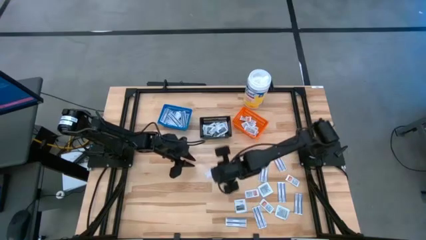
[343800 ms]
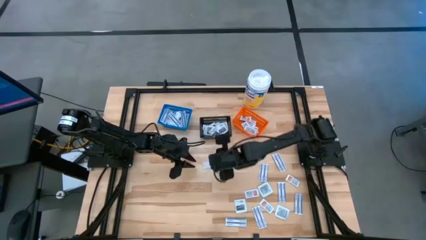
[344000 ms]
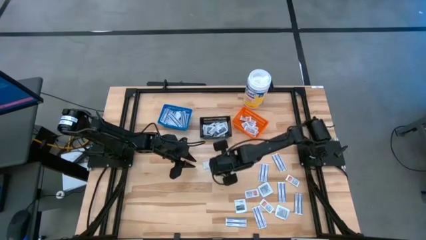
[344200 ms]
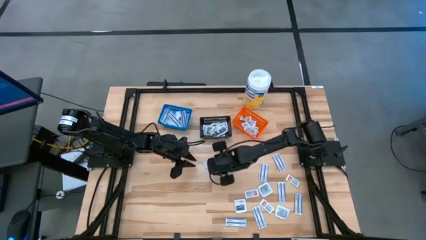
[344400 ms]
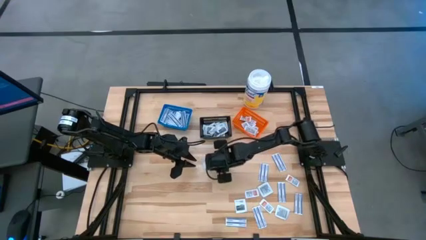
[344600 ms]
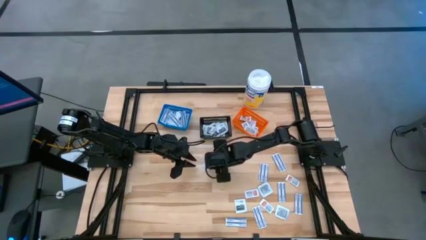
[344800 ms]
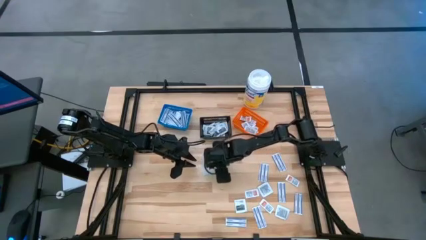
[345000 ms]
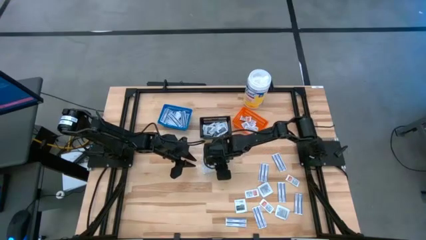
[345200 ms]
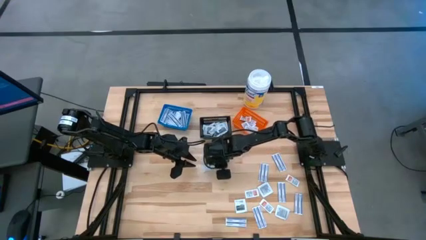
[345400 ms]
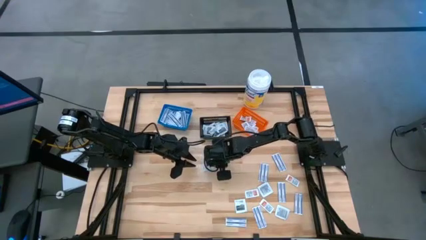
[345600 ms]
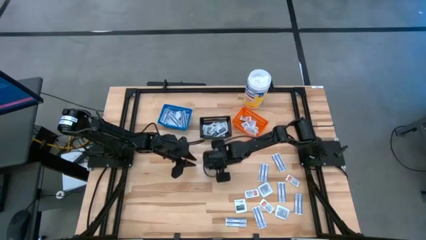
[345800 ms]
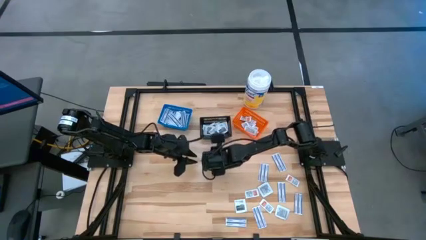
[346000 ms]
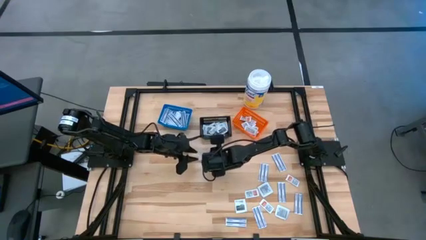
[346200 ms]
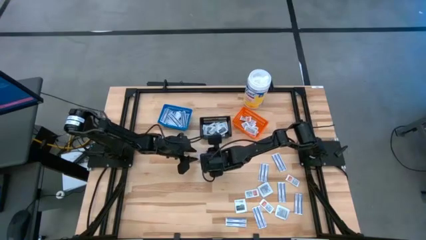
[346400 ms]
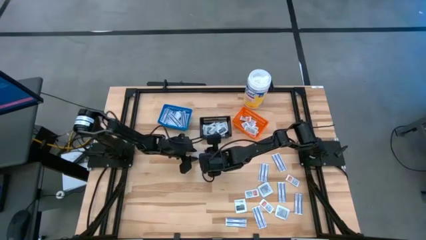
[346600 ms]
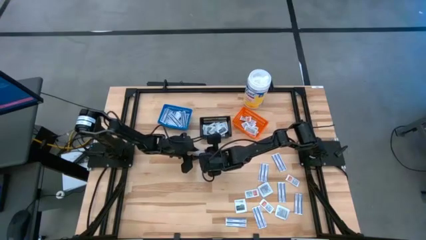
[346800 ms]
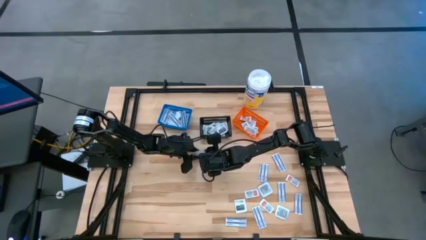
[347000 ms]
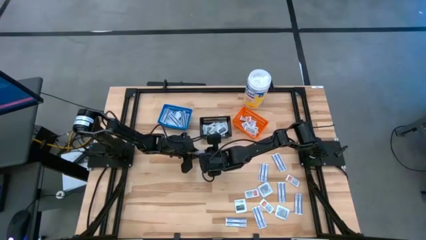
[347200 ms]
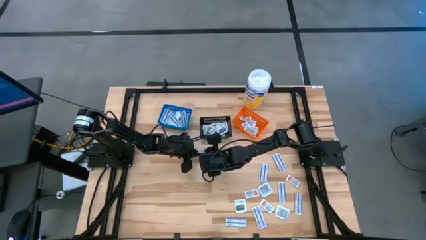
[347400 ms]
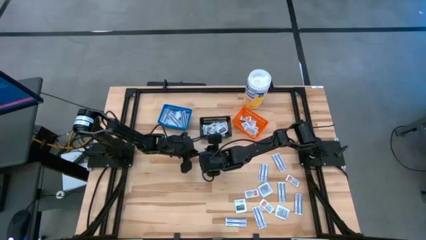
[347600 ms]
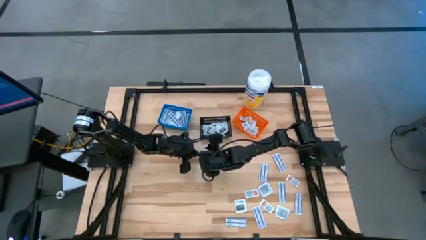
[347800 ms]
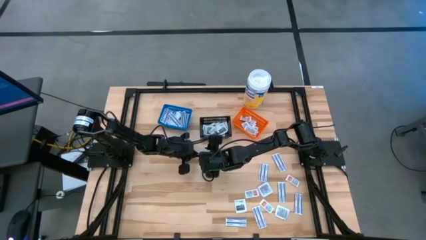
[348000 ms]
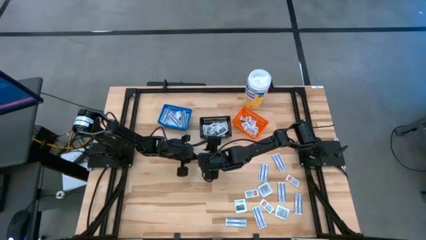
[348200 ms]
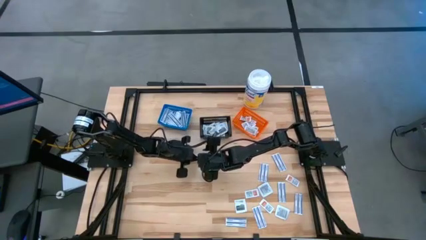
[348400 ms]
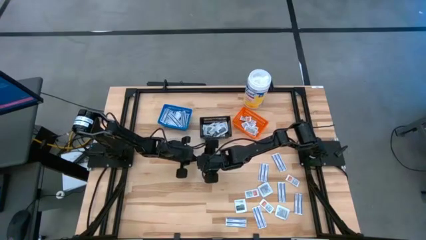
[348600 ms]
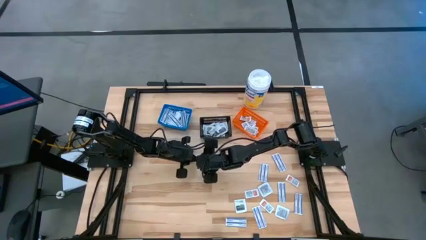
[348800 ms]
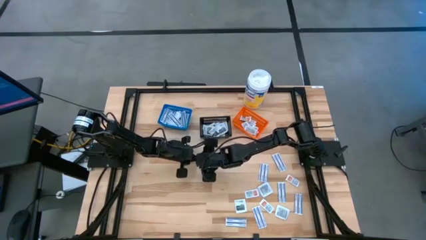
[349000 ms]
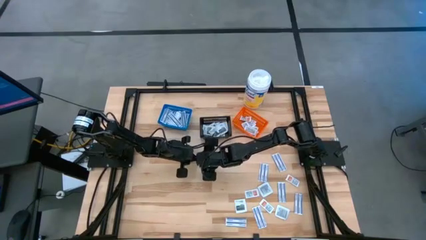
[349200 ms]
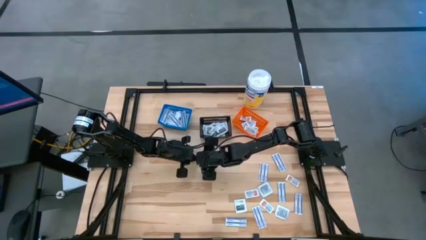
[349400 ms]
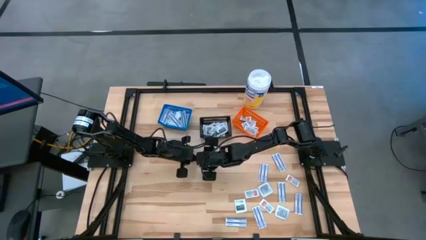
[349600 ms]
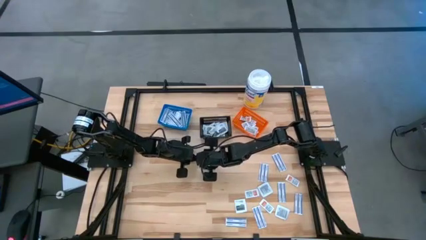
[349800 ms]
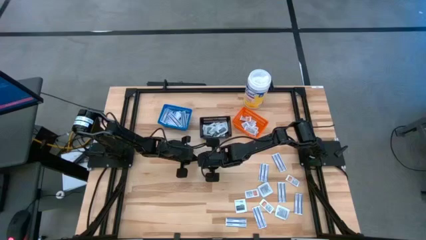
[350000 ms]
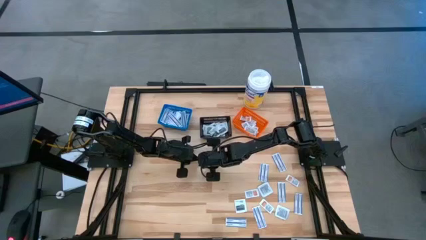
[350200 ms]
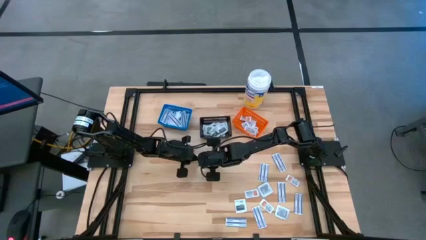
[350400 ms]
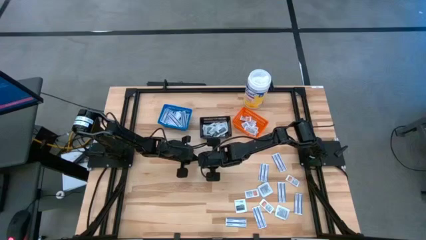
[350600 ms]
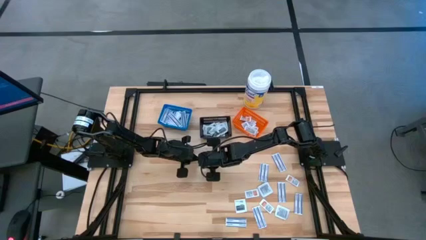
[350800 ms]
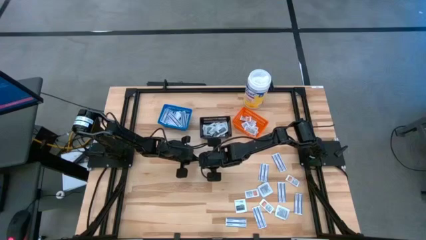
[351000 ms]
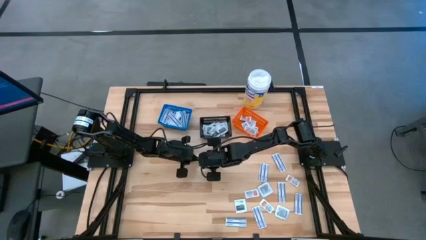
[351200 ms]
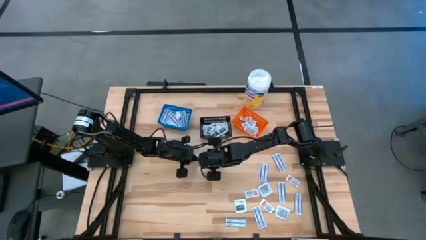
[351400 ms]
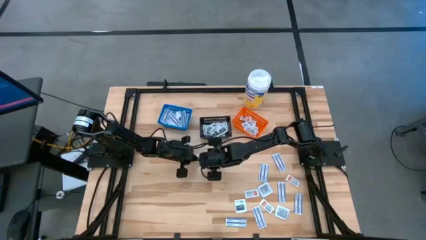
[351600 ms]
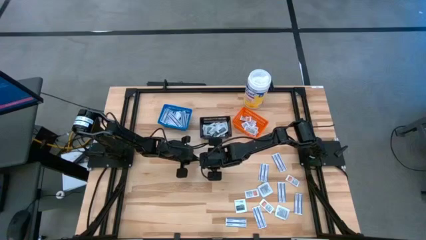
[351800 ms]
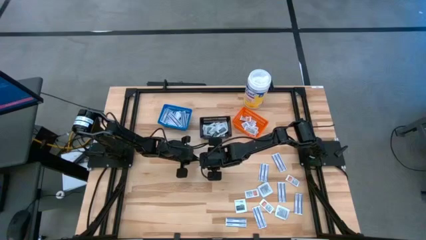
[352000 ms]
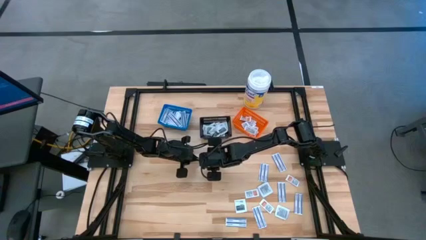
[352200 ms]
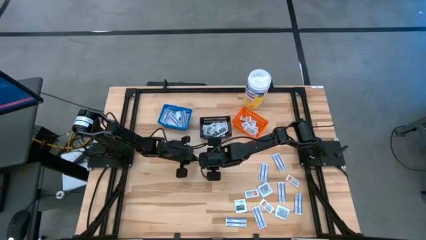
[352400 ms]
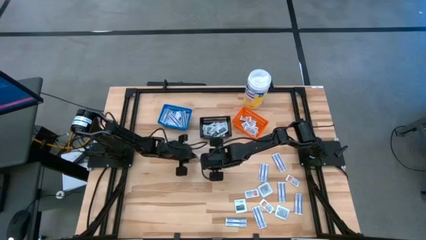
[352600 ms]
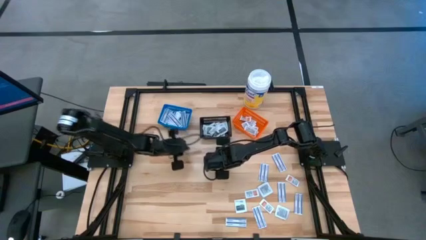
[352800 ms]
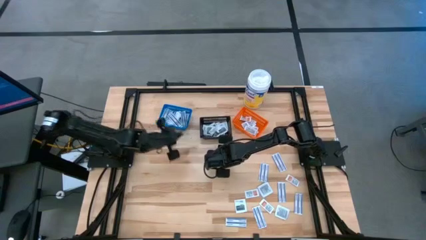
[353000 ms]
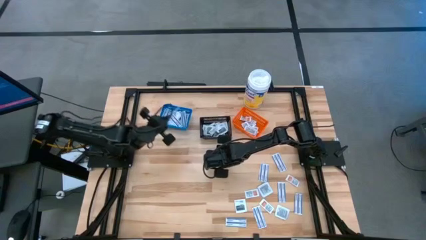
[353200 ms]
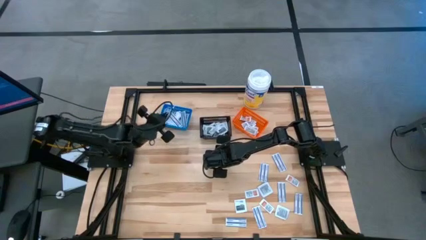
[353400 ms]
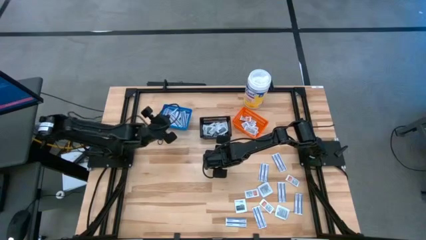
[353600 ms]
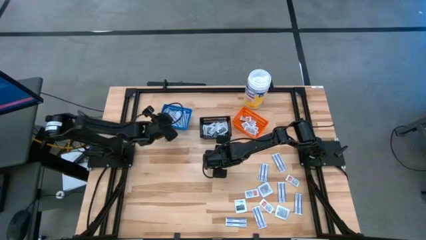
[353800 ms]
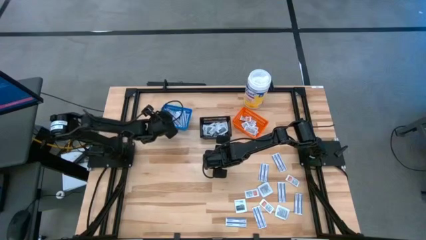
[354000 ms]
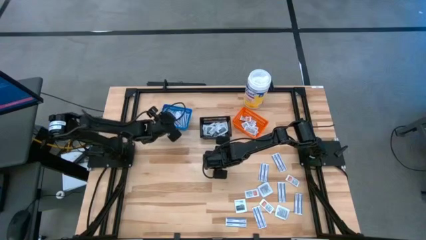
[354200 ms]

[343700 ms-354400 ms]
Task: Pick & Place First Aid Supplies
Put the bandage into the blue container

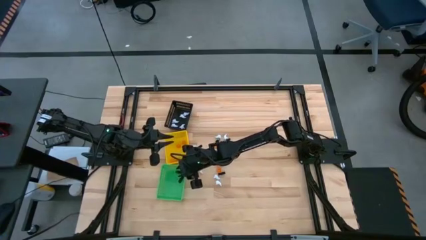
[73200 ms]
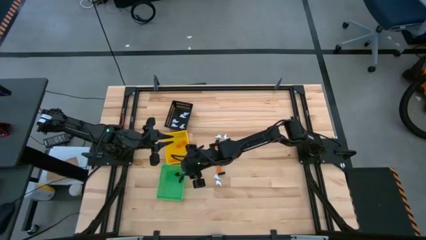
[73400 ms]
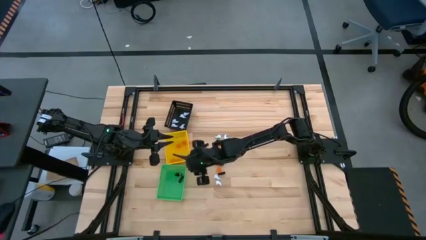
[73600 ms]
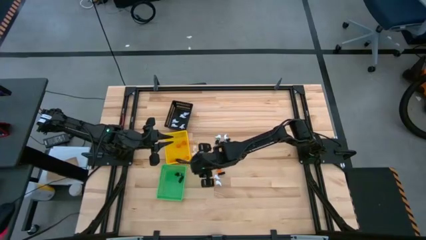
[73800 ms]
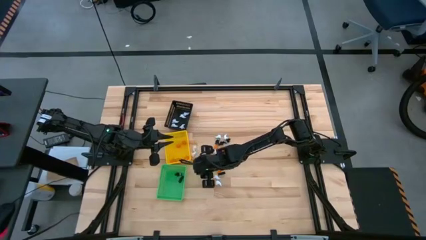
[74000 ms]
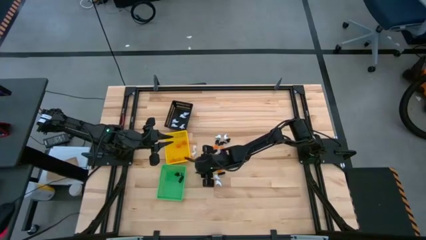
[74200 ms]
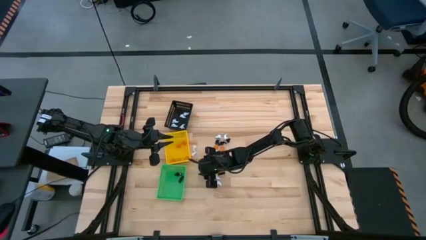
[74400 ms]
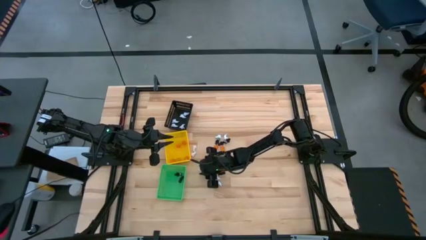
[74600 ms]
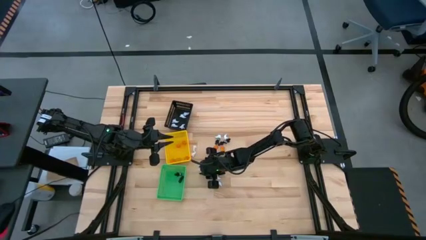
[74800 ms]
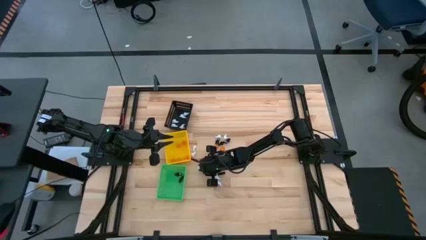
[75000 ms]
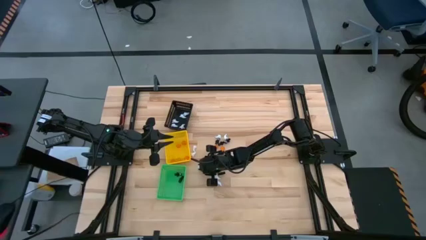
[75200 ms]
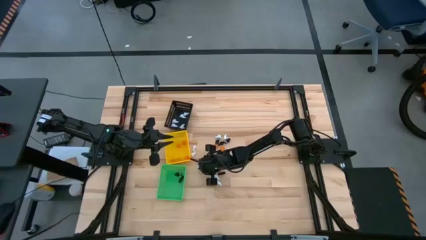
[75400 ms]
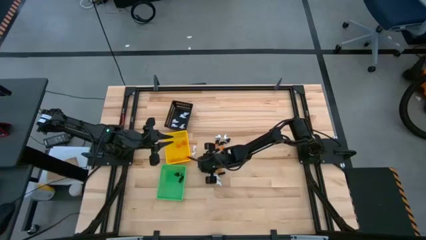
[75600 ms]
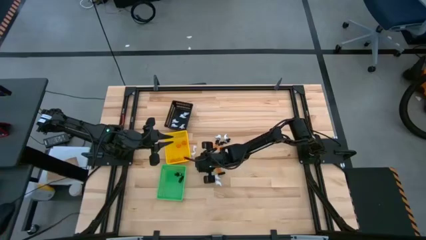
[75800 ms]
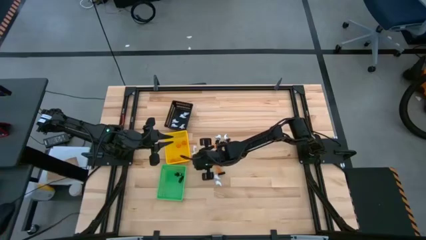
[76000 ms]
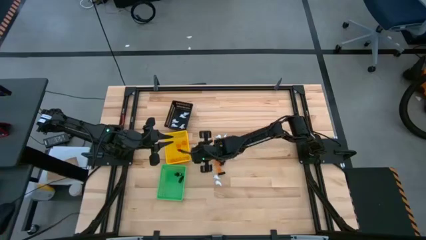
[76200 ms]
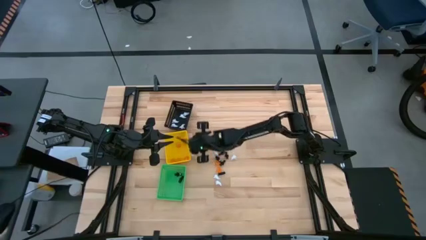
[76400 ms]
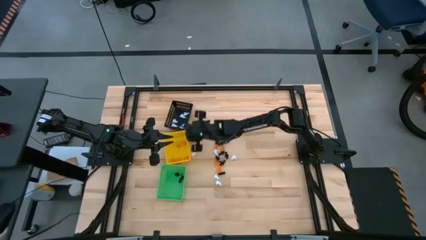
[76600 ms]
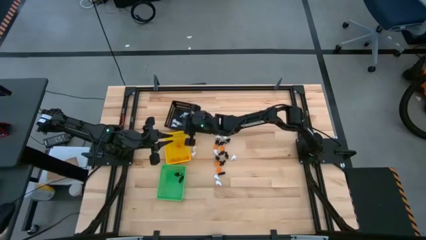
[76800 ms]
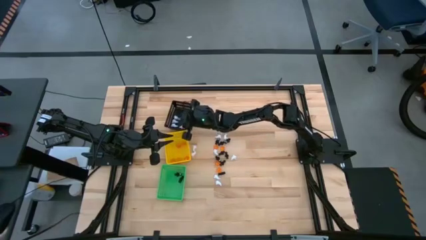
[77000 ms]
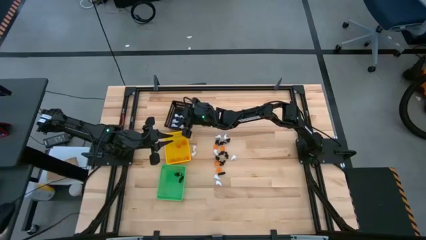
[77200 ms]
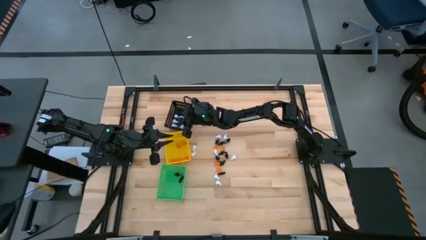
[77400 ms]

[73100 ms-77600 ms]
Task: Sort Halloween decoration
Put the white ghost plush toy into the black basket

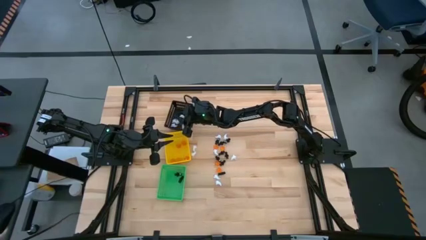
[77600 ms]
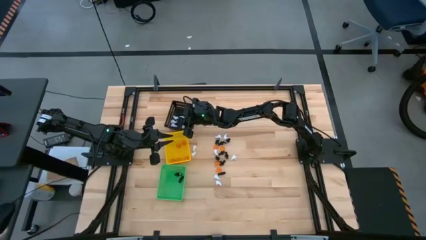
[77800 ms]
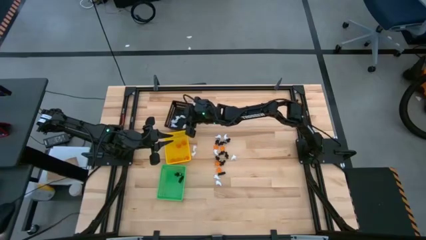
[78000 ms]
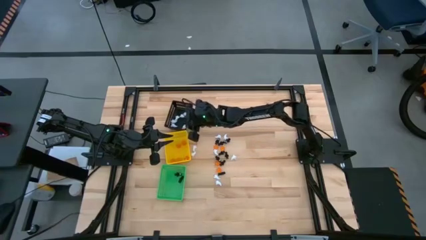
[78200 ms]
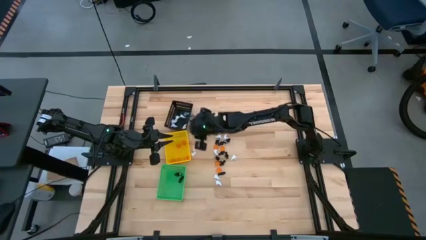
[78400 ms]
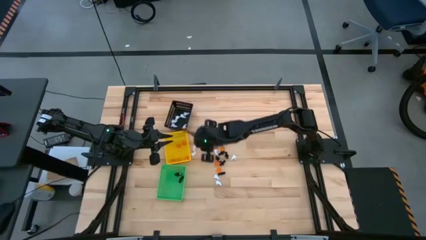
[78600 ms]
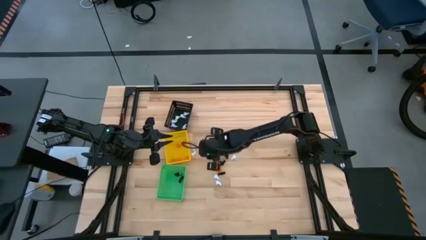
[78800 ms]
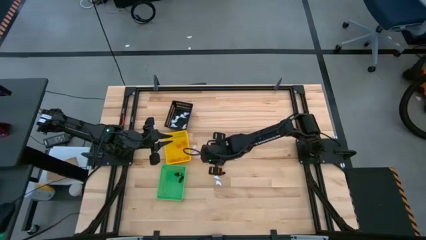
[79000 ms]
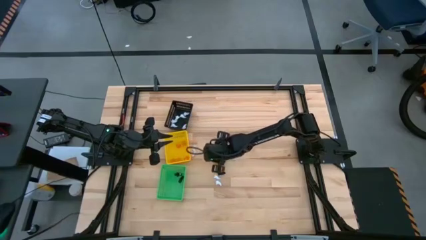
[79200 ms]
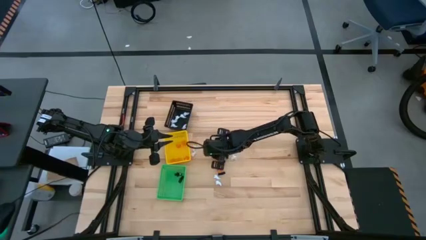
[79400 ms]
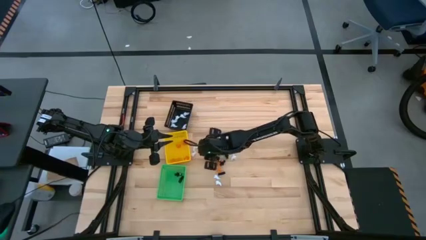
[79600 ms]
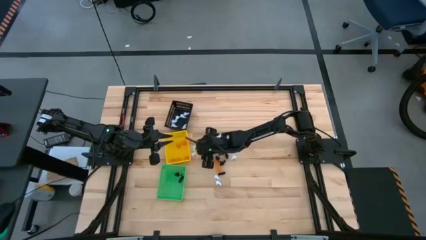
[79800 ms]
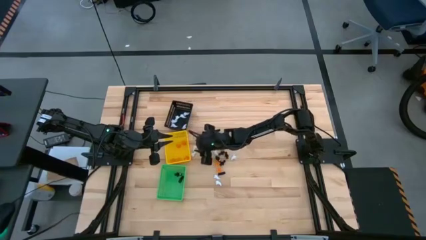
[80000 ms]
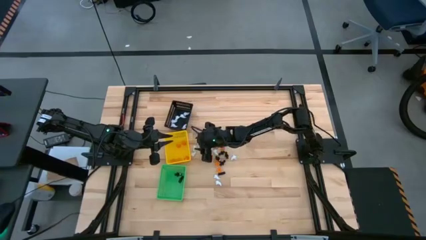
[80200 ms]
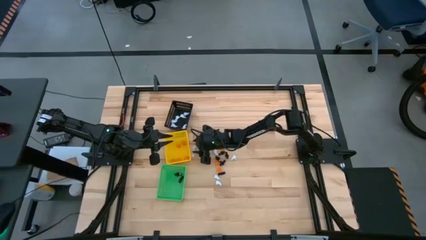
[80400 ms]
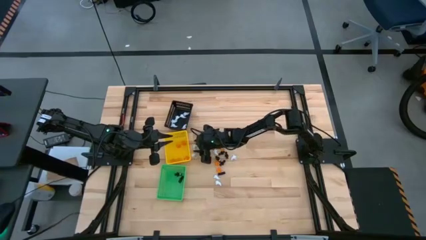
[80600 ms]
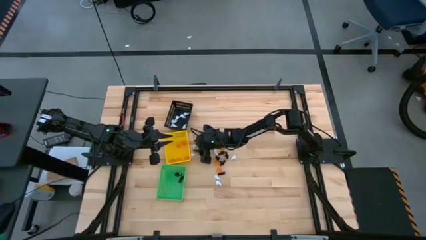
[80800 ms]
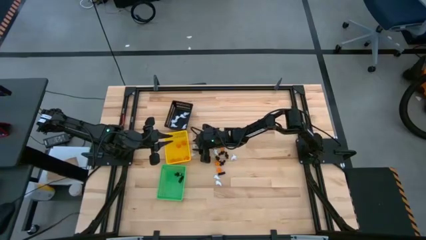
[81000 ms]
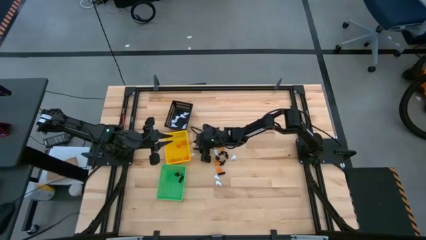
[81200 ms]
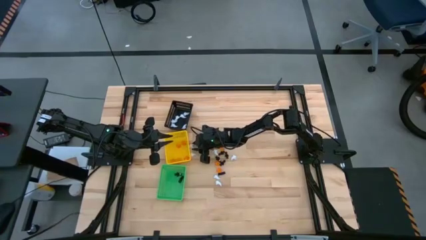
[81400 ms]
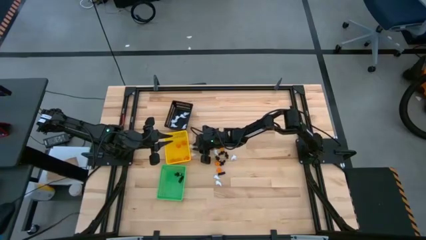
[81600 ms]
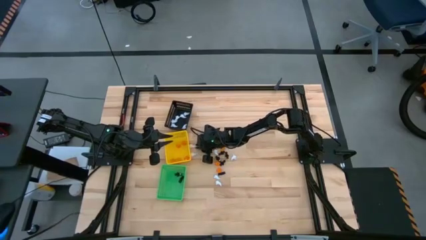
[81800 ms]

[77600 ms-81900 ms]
Put the white ghost plush toy into the black basket
